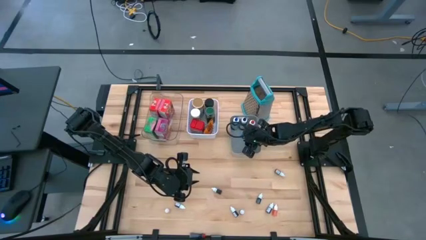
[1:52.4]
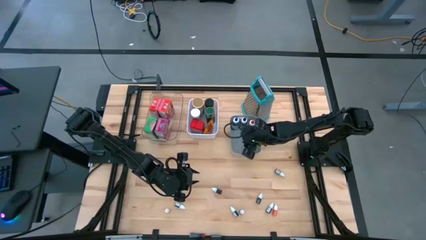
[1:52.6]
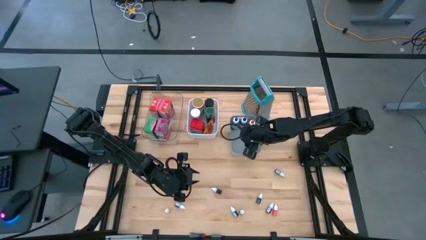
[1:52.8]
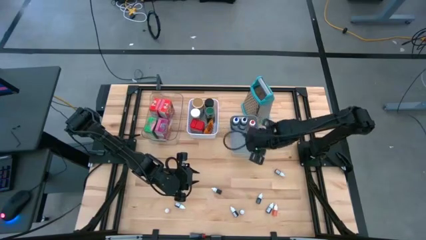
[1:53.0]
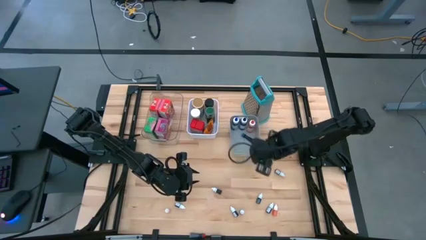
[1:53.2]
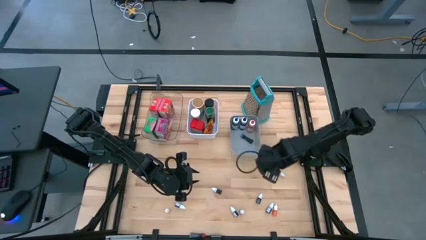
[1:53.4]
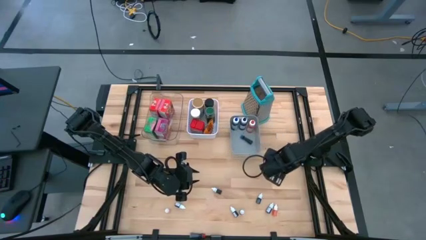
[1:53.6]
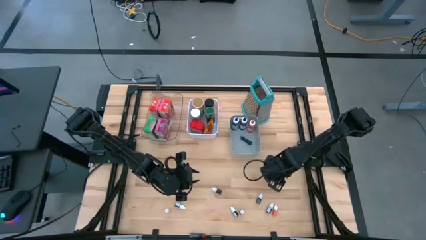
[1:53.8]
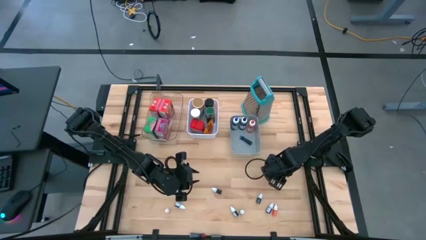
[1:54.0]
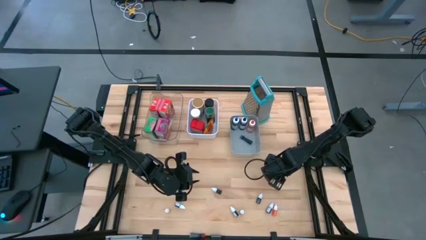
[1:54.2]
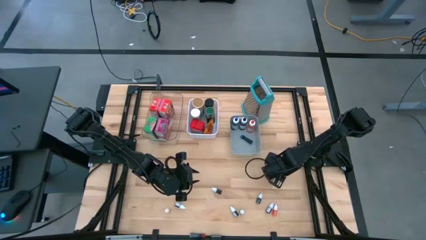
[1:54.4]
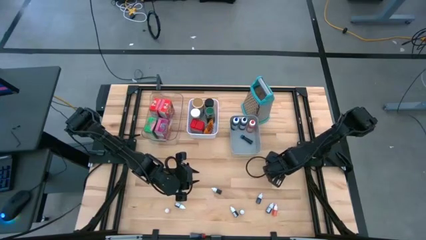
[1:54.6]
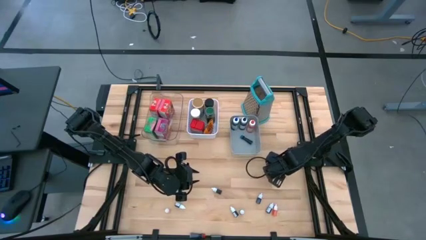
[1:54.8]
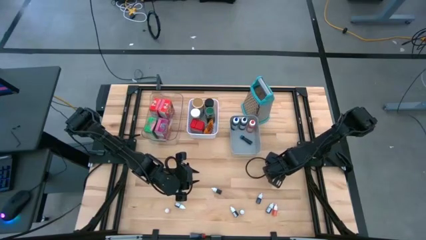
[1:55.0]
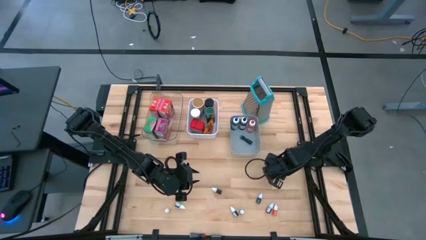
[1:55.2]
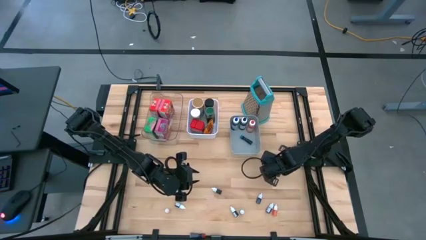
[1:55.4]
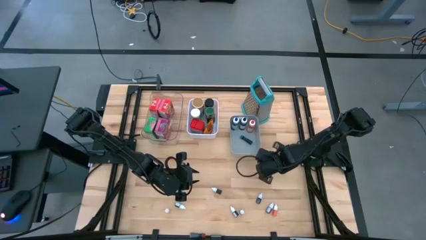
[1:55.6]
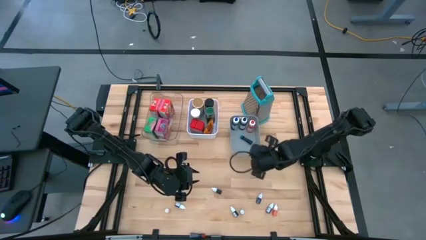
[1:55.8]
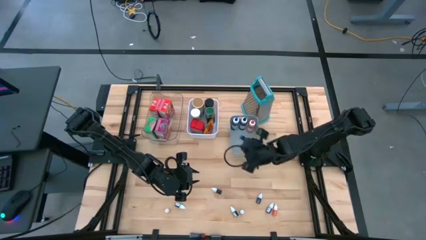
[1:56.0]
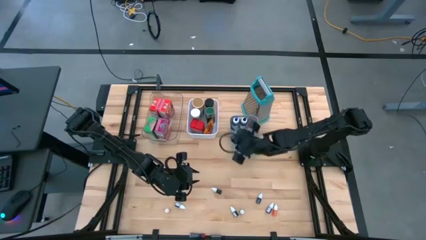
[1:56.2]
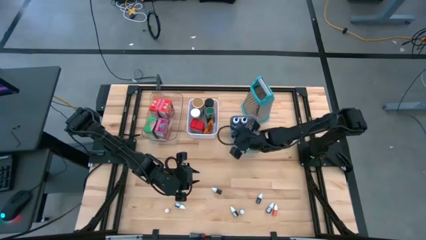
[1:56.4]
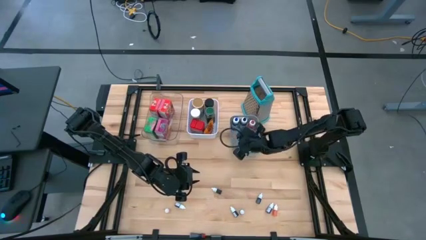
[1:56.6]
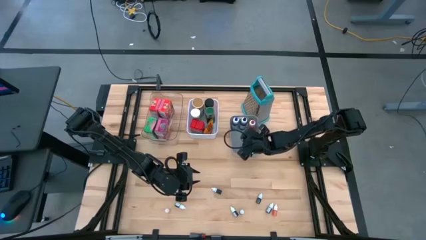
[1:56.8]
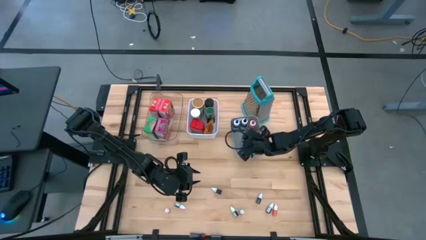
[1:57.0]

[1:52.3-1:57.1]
Task: Pick & Place Kitchen Items
Put the small red food coloring into the gray bin

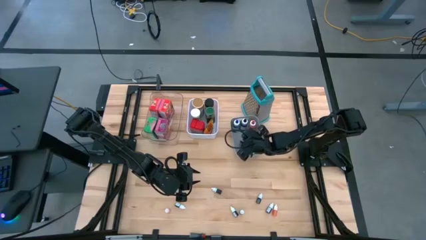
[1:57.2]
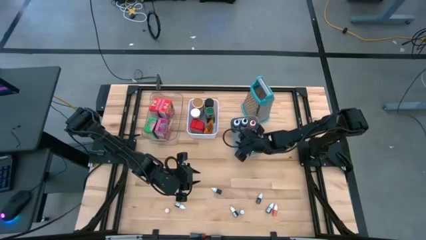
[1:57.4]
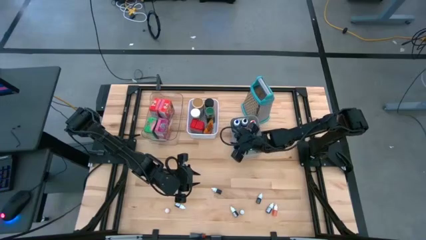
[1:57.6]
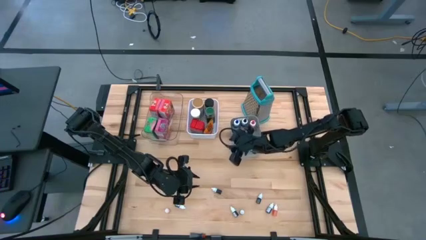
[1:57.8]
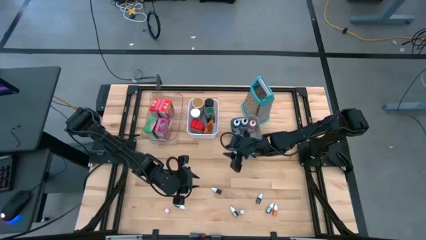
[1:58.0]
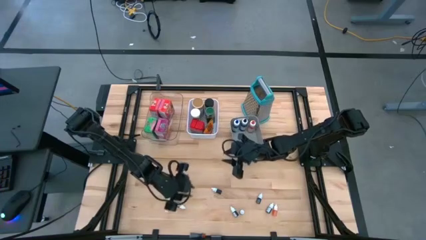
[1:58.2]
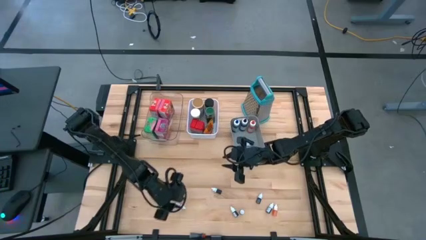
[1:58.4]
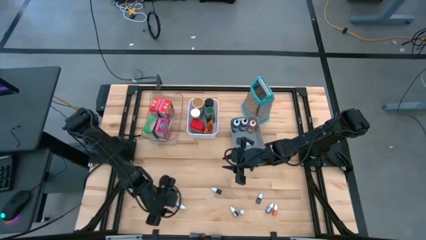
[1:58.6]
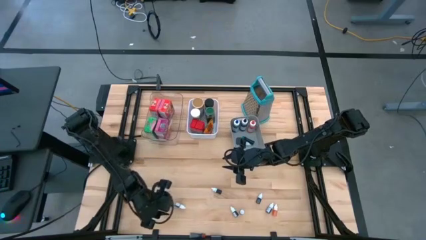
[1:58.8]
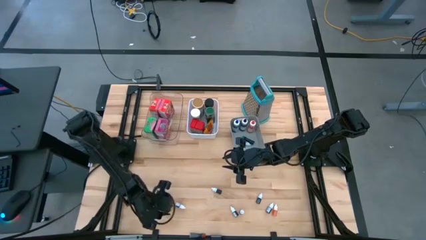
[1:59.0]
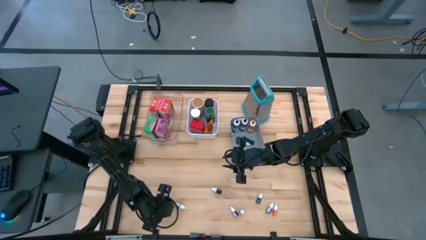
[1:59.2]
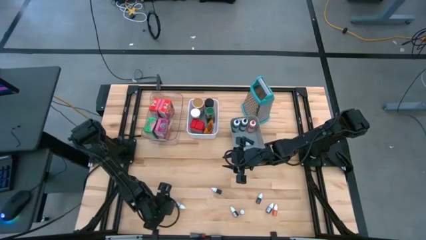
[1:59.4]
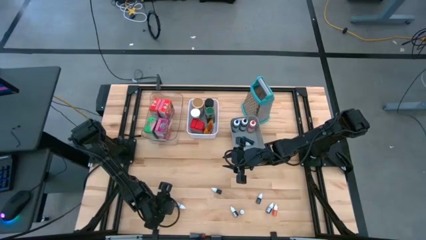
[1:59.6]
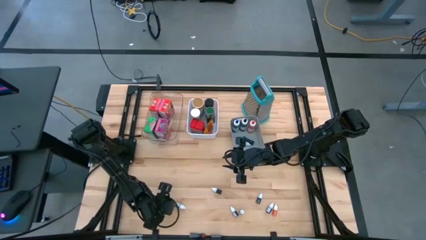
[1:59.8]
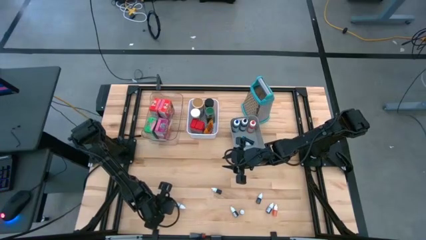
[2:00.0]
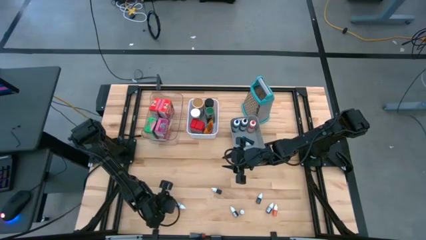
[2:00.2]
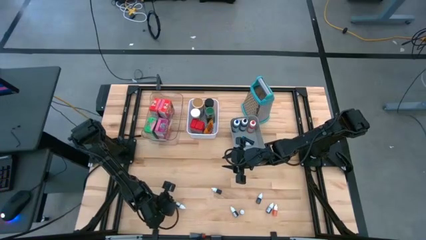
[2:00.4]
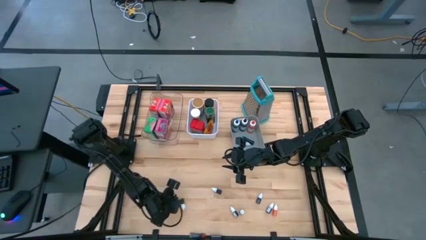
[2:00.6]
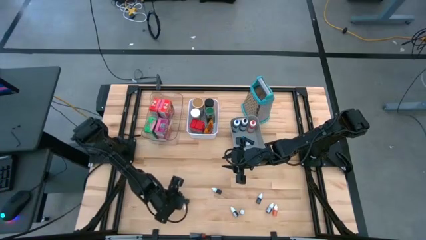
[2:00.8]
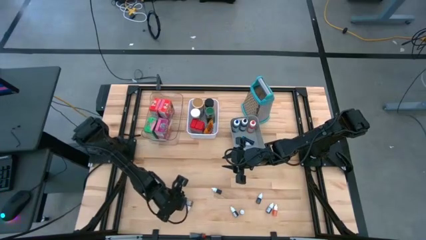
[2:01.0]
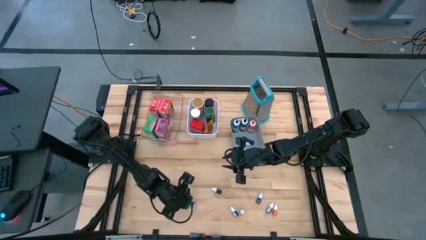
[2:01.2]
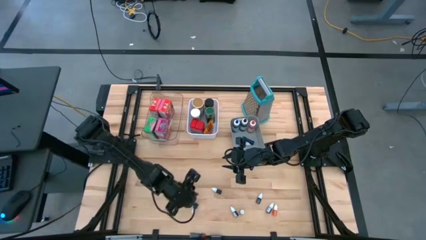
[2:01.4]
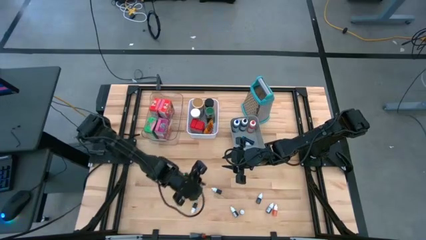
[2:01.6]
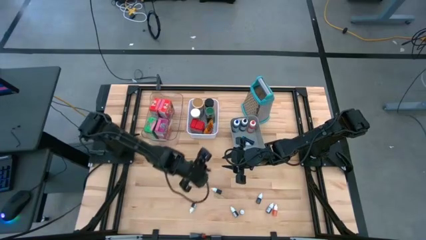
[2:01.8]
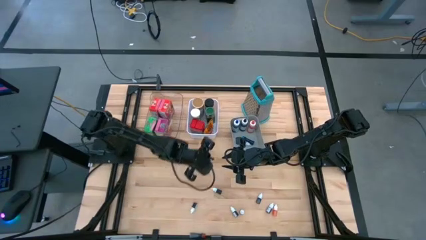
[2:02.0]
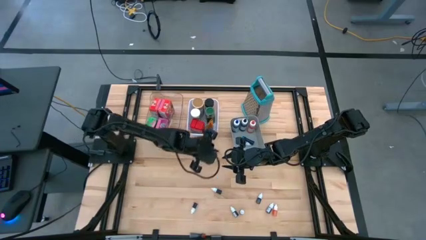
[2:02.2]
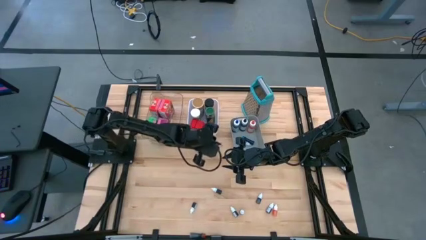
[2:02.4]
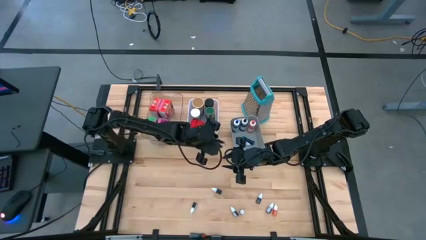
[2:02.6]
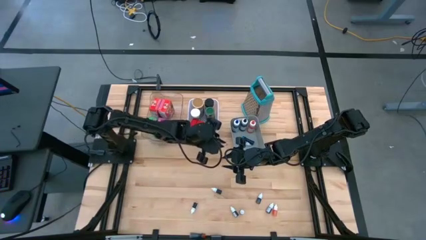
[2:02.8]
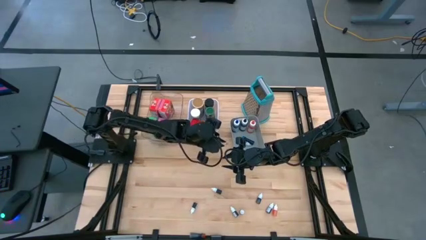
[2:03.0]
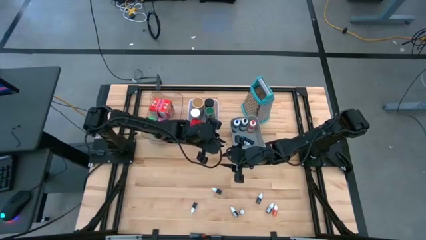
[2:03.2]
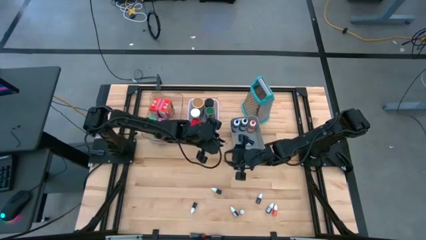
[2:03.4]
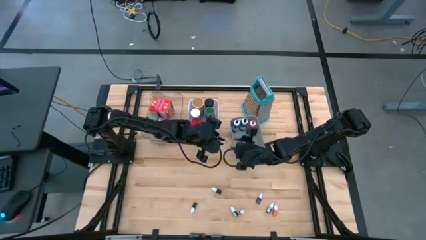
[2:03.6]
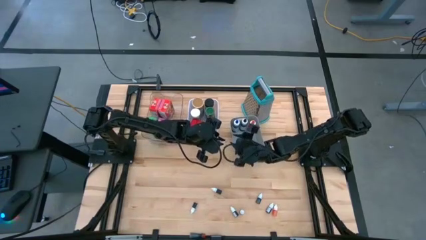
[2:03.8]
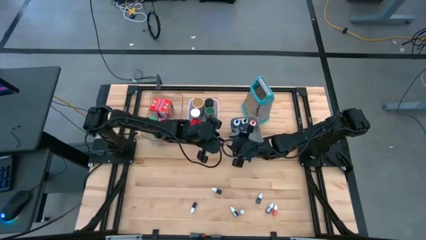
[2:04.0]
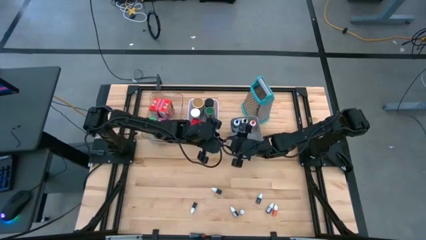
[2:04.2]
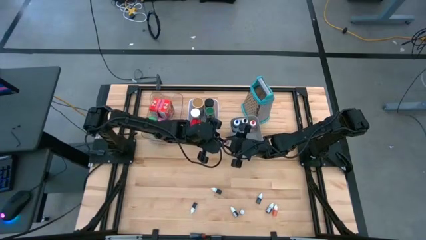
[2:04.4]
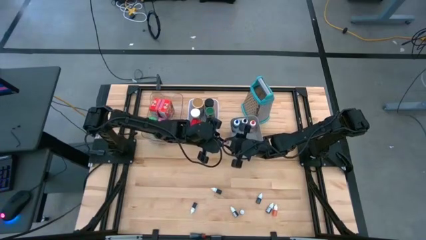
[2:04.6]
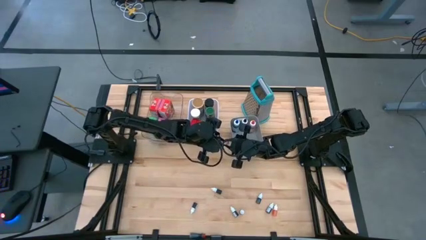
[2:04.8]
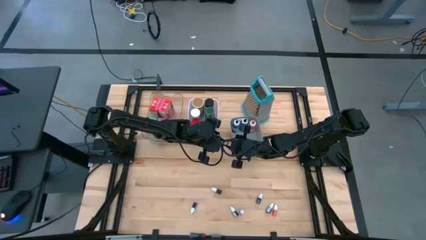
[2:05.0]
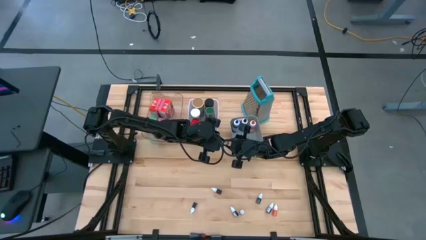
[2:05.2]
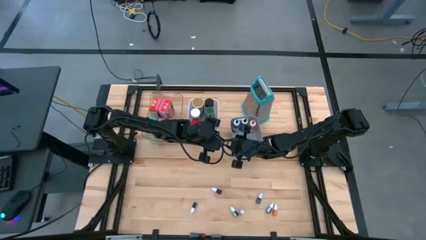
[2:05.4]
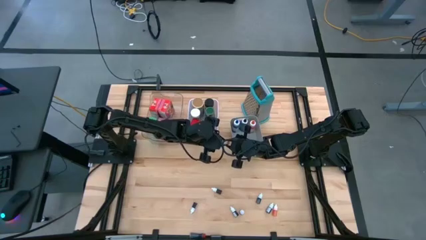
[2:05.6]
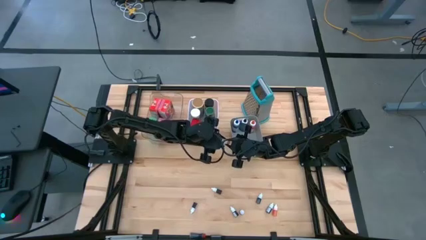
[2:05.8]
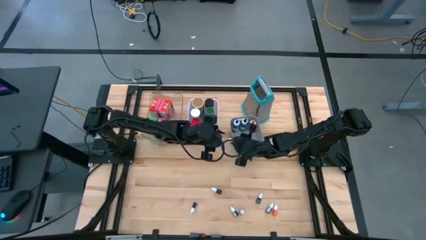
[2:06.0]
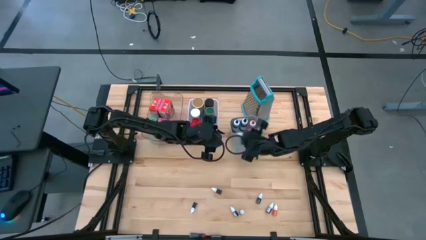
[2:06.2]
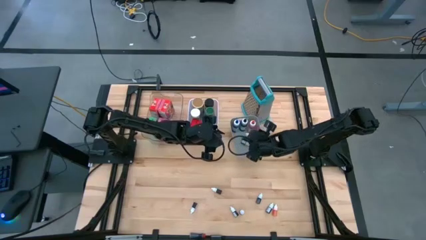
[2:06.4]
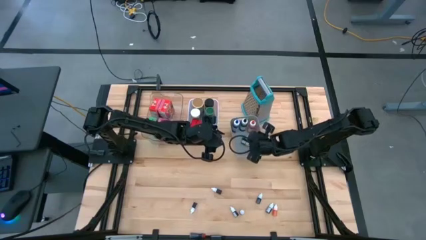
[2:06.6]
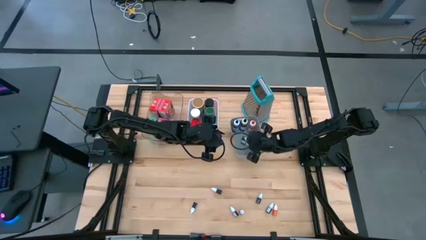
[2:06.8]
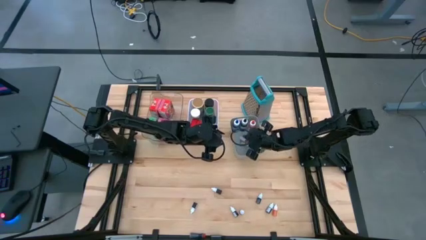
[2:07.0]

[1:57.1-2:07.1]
Put the small orange food coloring into the gray bin

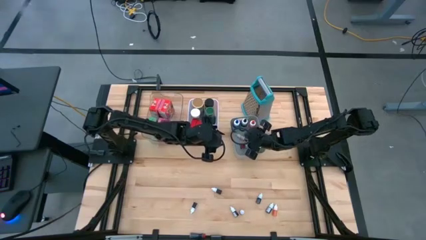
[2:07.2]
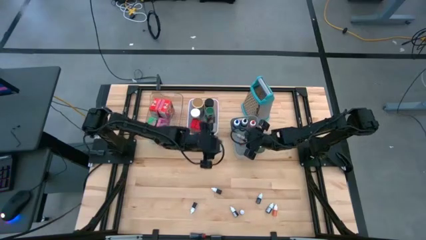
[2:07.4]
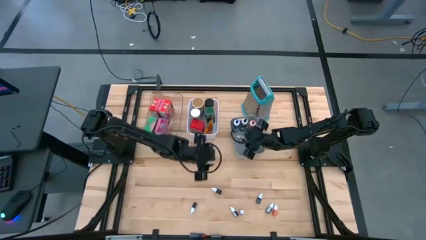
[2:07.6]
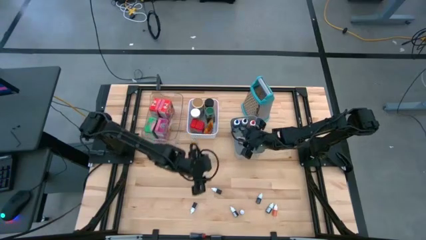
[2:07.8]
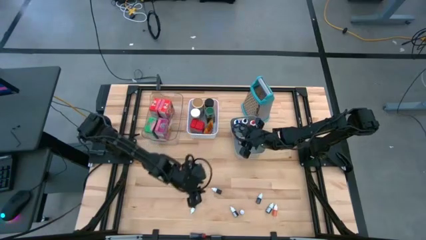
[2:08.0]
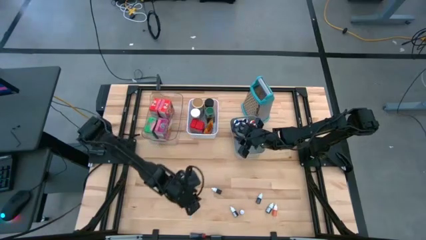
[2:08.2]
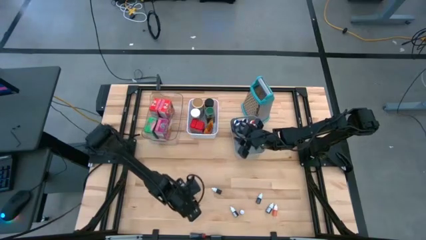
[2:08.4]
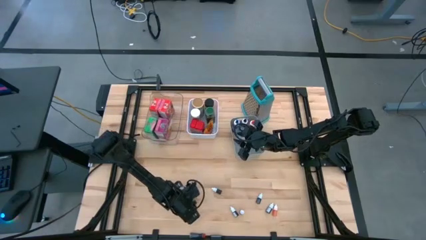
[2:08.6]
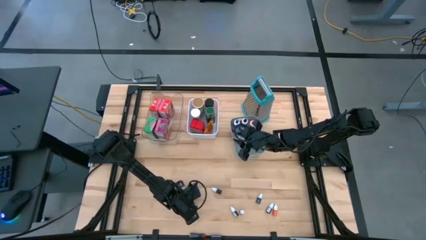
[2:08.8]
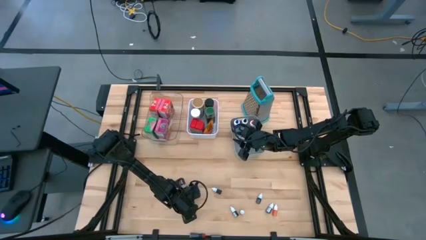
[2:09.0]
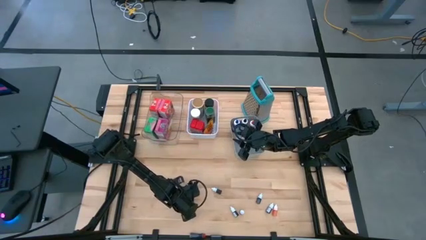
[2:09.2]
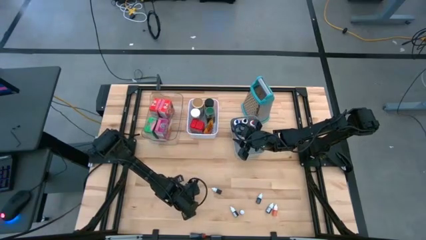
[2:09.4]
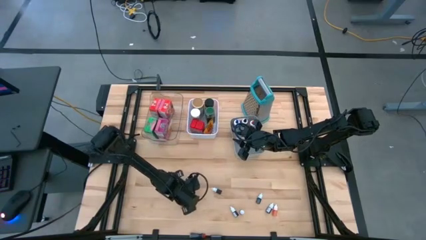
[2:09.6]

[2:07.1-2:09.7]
Put the small blue food coloring into the gray bin
